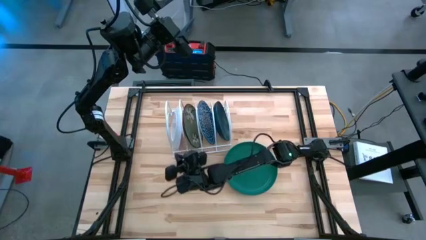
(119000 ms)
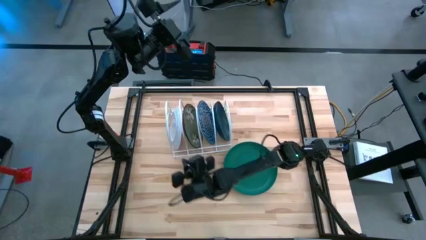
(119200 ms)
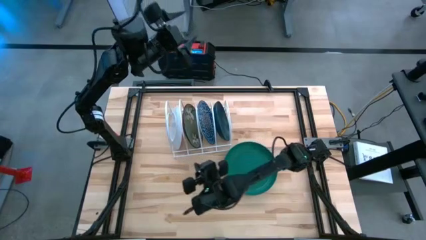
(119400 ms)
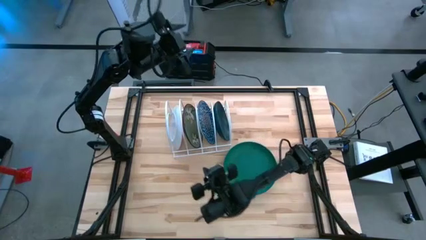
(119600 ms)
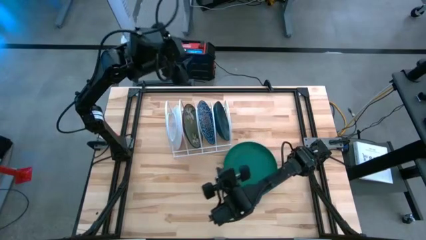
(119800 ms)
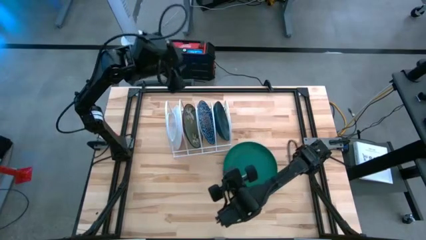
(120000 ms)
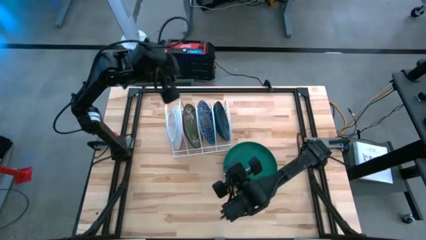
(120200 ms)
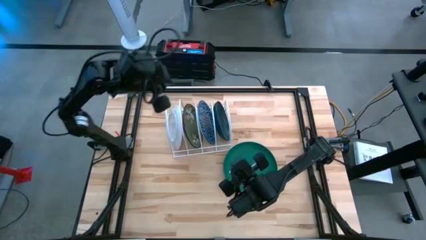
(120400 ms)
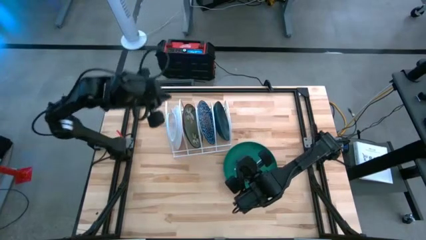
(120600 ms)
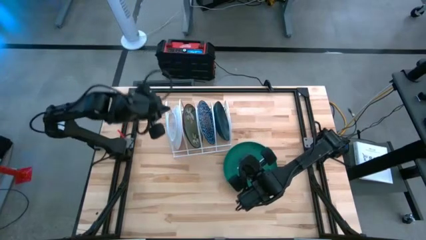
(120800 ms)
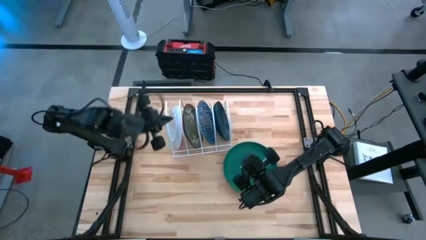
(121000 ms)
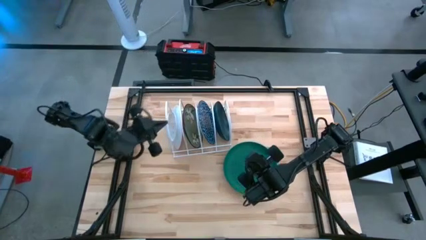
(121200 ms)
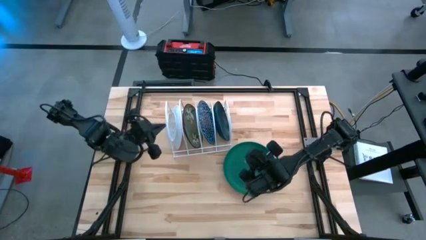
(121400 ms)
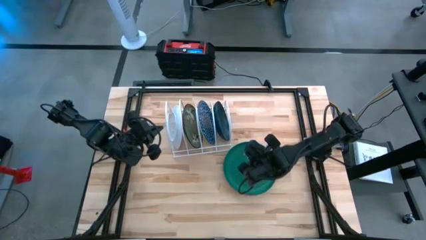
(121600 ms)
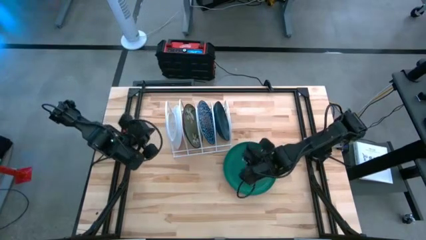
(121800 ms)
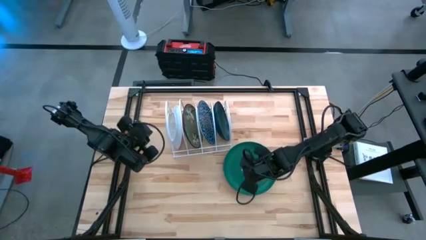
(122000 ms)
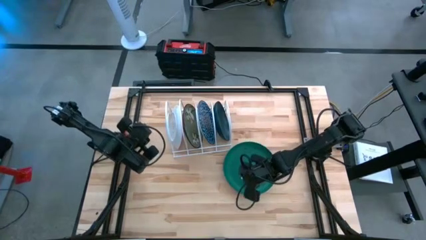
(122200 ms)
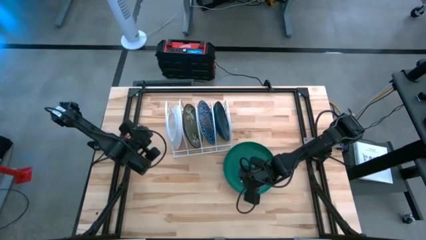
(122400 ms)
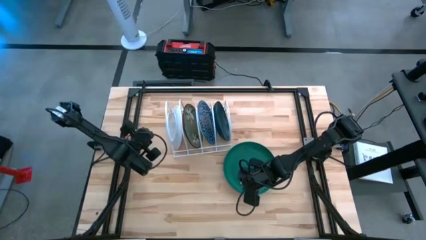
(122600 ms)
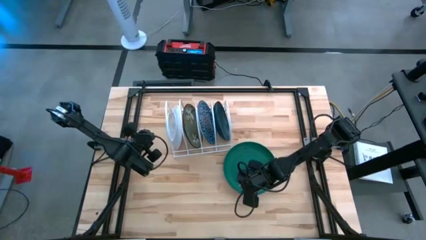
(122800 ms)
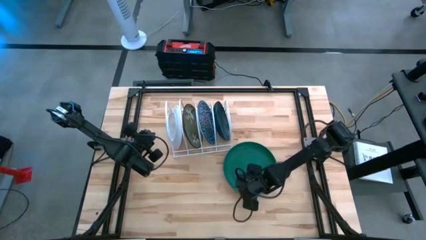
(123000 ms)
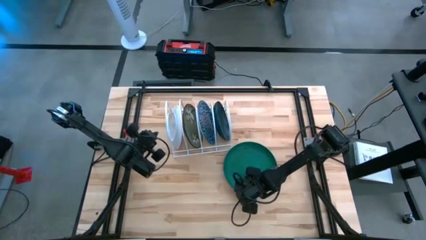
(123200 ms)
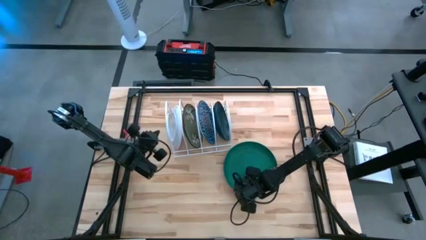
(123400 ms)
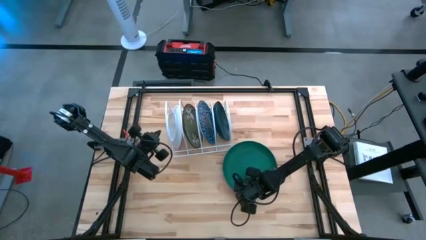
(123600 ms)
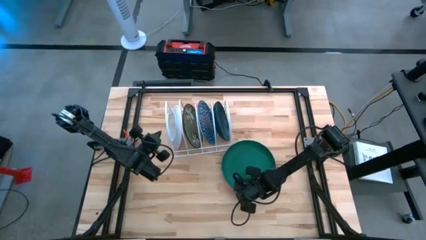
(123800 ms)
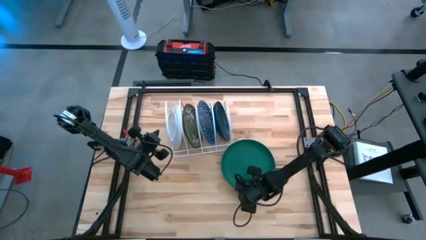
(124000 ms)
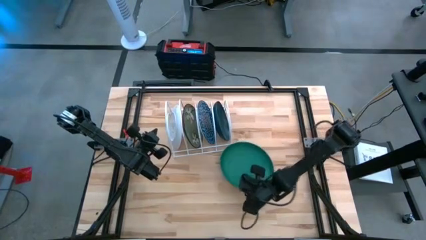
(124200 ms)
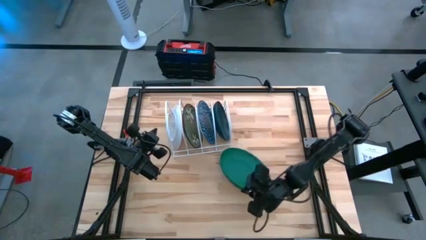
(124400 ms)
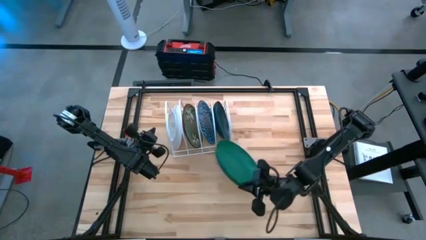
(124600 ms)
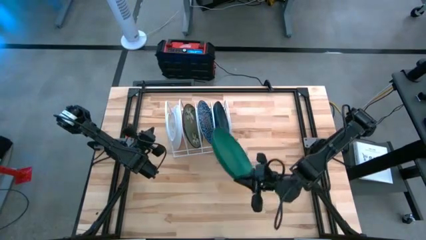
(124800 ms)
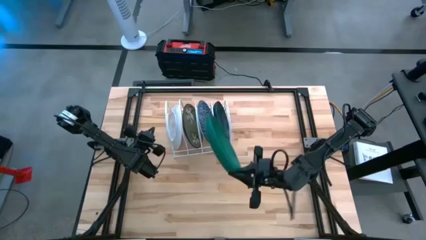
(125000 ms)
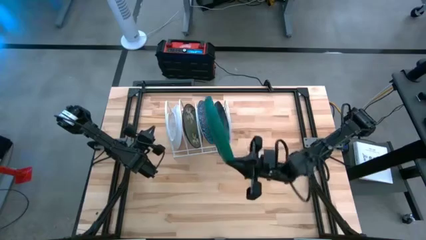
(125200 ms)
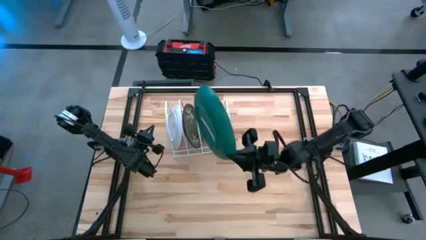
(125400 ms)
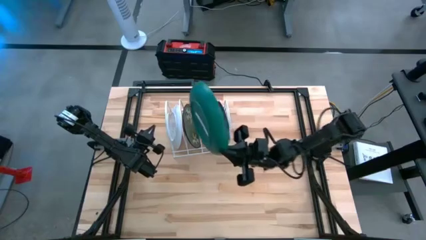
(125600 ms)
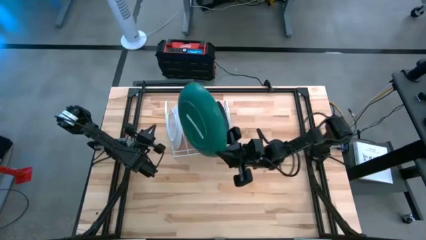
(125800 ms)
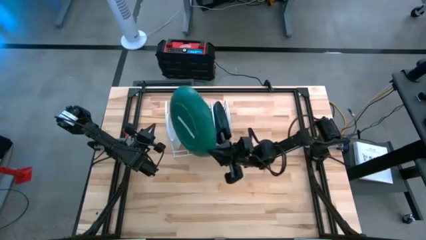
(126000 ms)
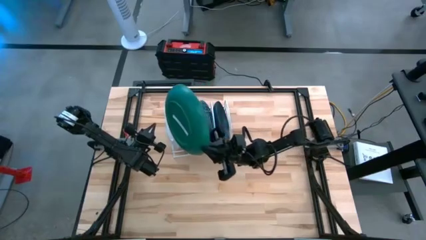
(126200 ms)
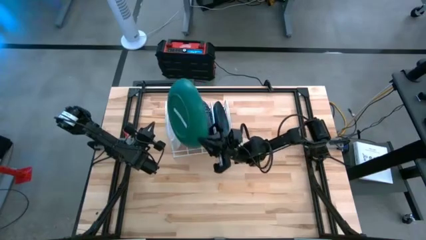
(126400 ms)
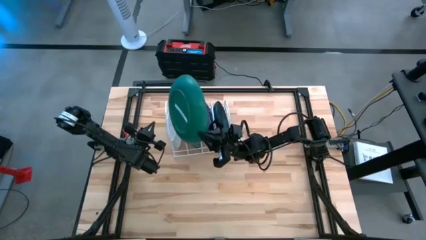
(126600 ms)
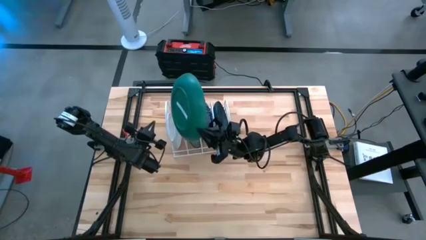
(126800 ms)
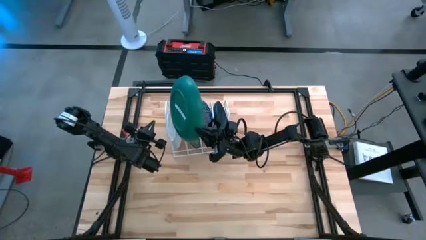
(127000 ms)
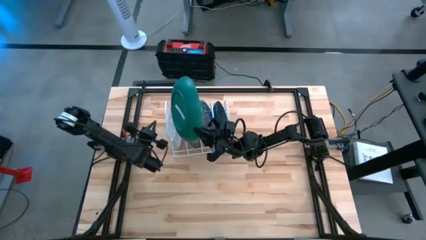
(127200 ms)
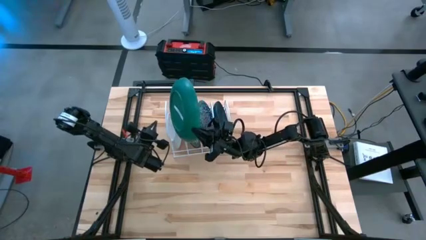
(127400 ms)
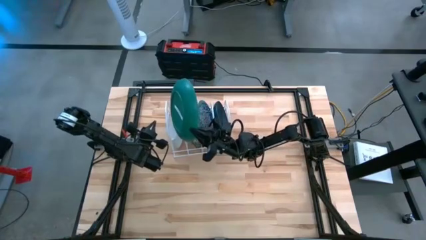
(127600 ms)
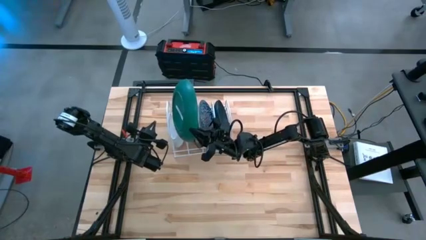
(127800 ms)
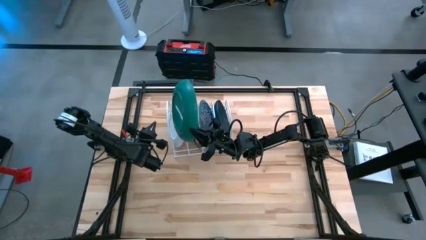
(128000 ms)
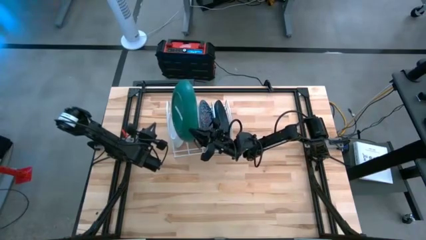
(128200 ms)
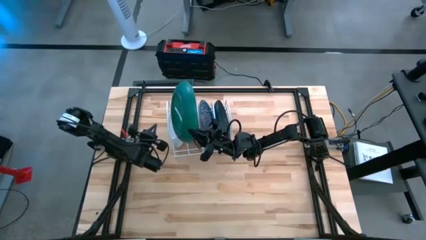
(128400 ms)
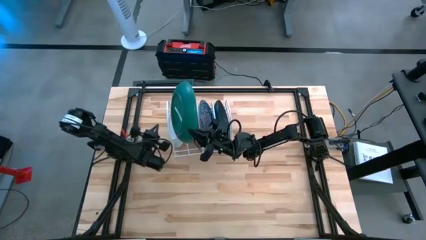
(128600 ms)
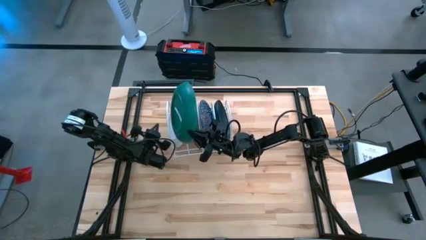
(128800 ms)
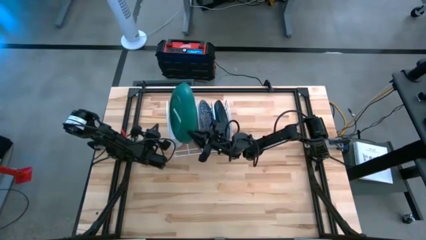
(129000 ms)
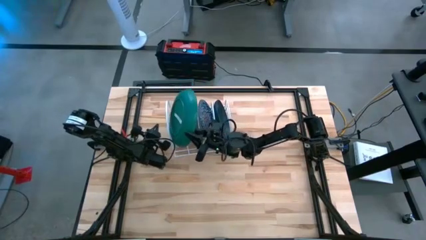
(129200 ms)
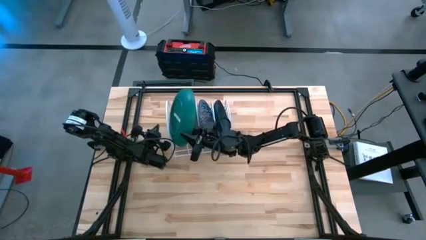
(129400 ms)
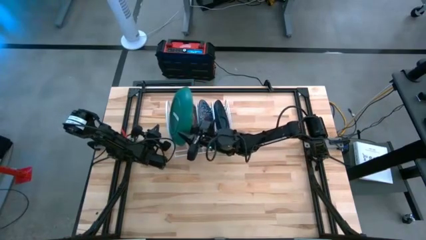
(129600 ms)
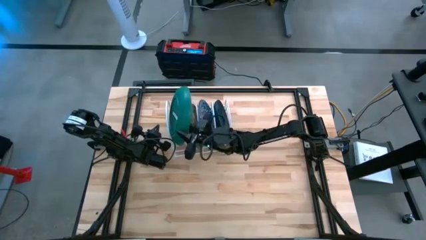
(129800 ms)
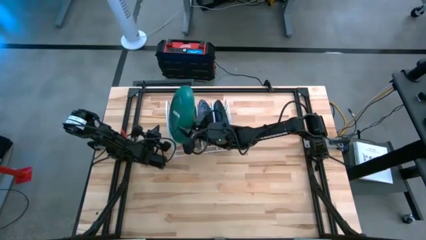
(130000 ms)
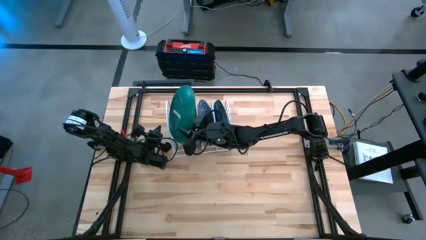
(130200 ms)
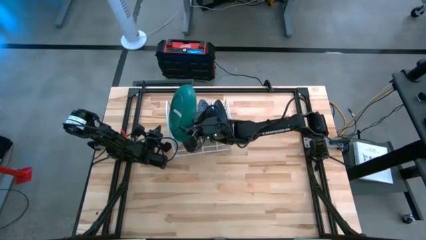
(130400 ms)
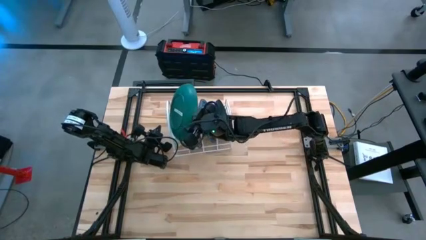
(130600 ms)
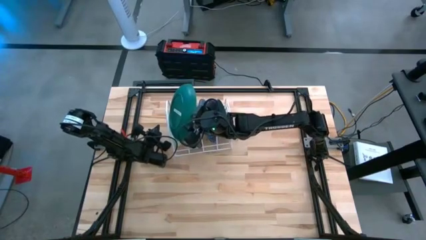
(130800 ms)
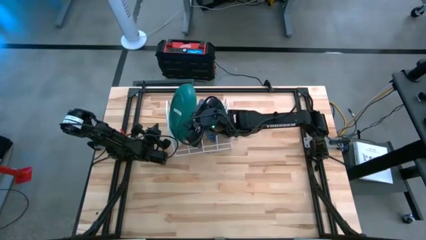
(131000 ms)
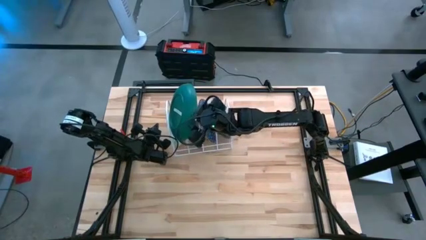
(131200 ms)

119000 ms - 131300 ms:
Task: Sort dishes
Put the dark green plate into the dish rack

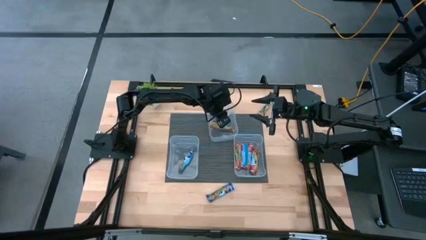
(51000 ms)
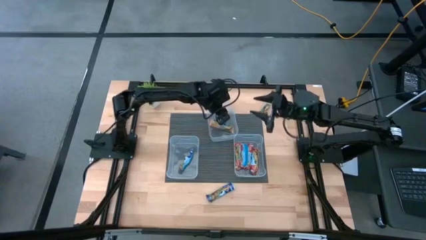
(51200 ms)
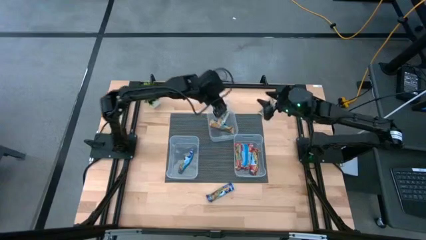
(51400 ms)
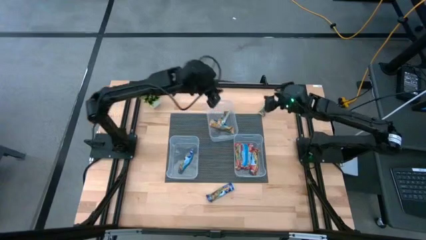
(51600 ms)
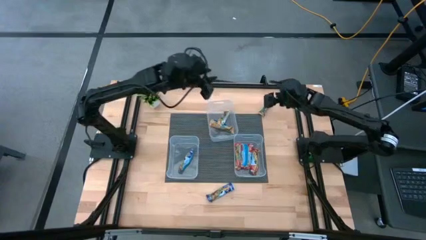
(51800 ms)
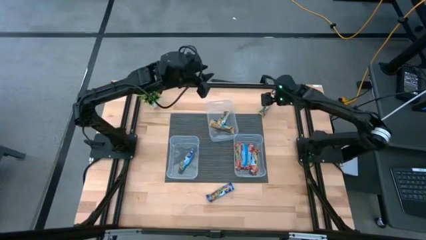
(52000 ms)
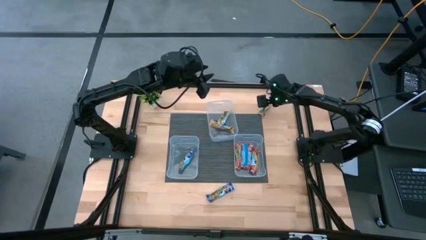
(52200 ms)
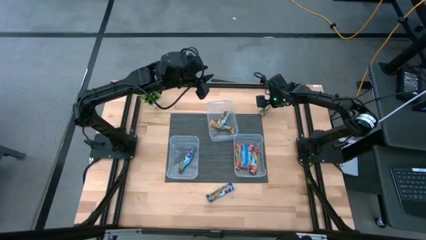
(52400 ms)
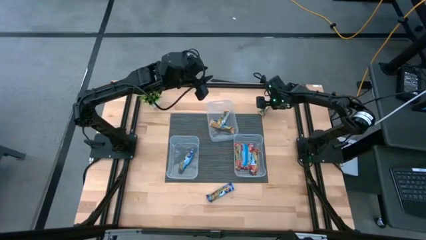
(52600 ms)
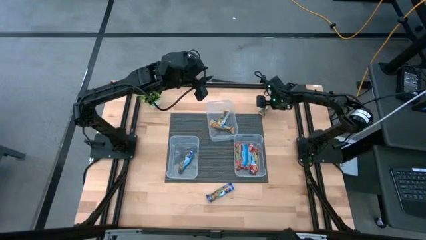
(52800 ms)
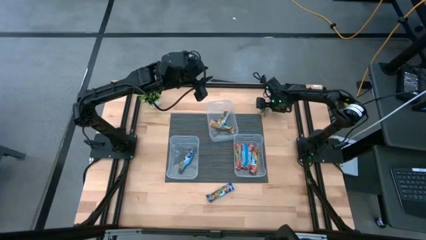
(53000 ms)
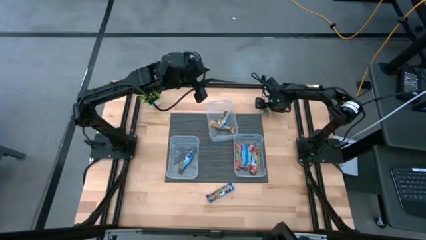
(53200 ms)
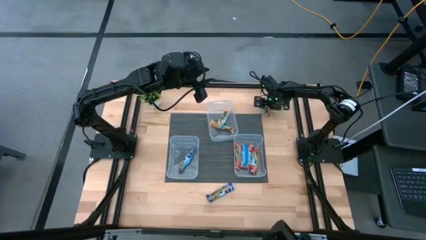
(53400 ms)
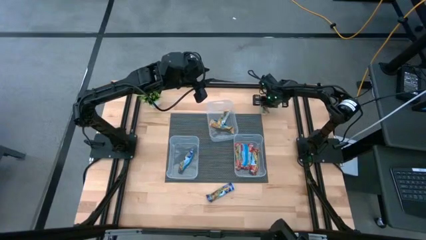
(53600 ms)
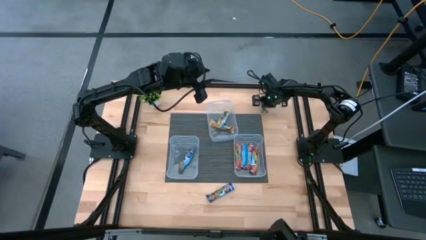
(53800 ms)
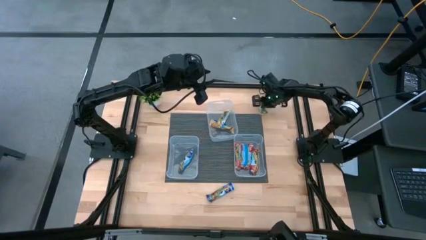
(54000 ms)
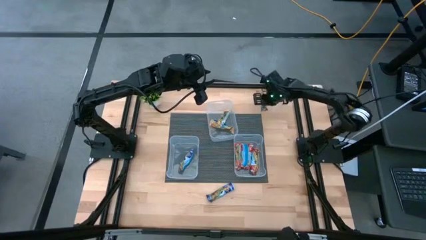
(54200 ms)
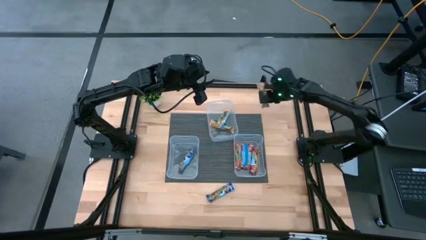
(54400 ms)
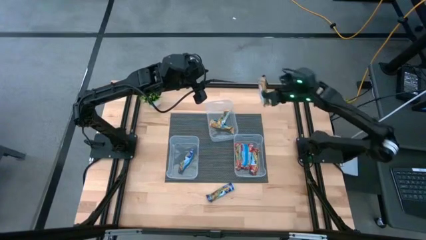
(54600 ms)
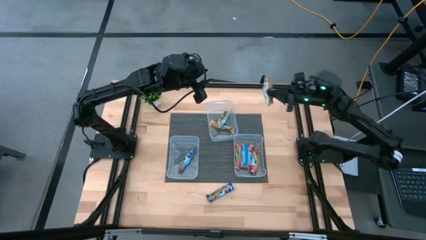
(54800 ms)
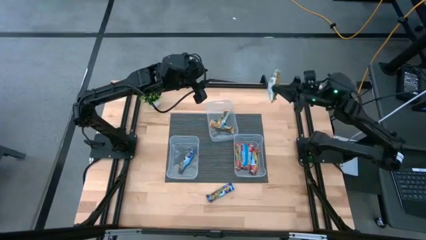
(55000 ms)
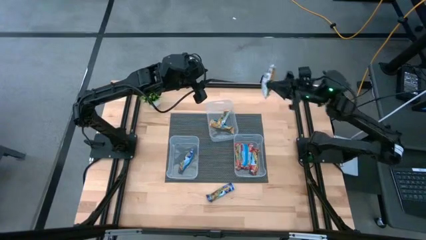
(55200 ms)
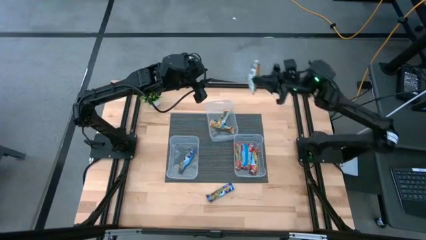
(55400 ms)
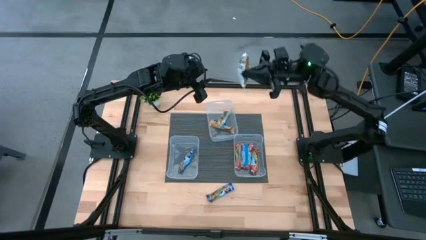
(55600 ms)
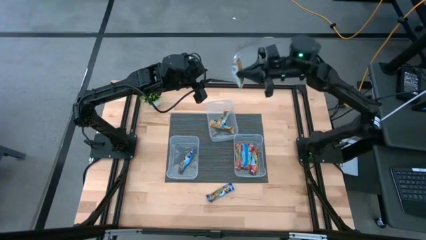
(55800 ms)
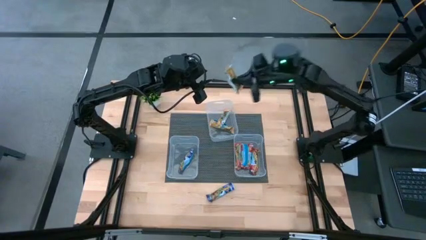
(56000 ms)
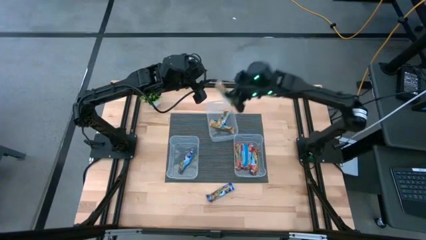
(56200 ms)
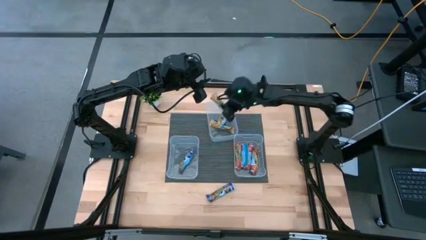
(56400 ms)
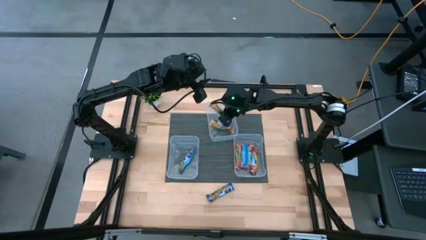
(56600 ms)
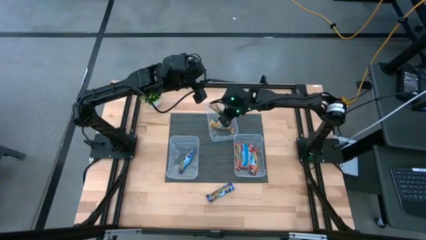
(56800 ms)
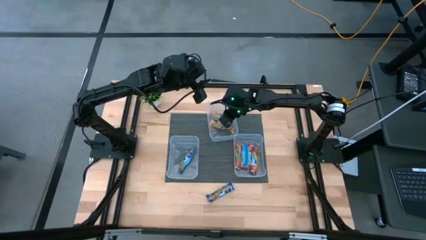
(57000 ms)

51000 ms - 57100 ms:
Task: Pick and place Granola Bars by type
Put the yellow granola bar into the top transparent bin
